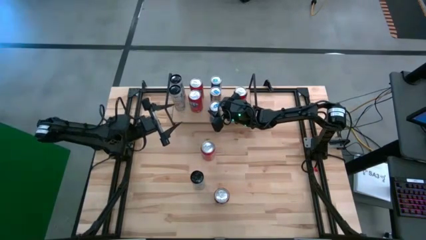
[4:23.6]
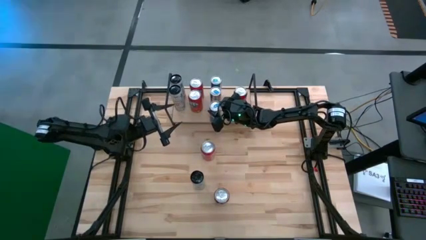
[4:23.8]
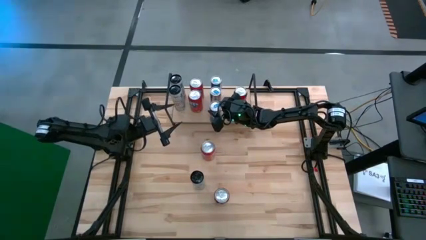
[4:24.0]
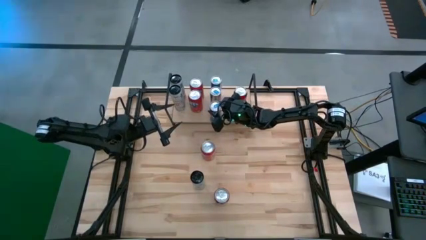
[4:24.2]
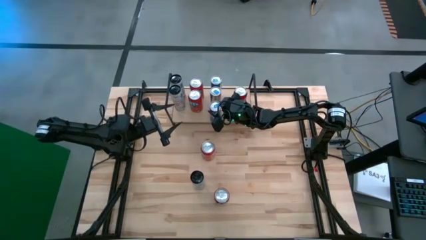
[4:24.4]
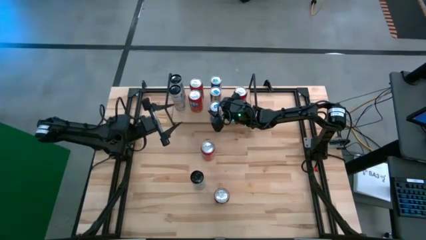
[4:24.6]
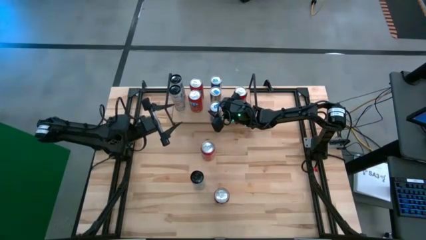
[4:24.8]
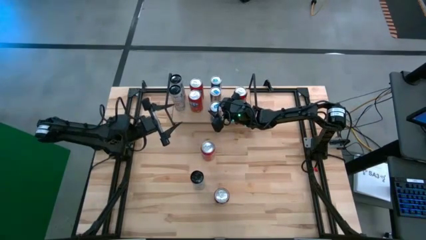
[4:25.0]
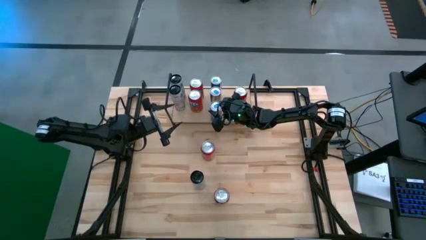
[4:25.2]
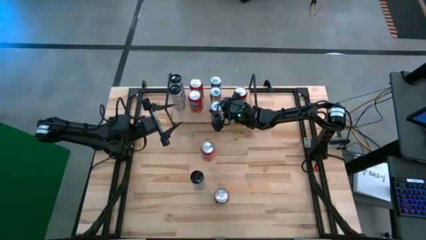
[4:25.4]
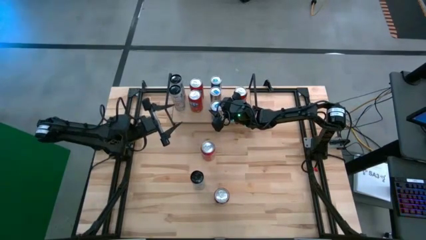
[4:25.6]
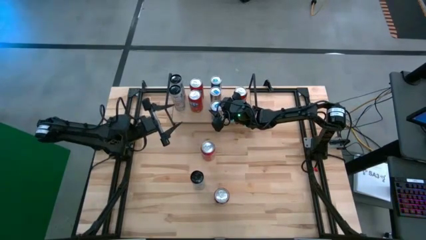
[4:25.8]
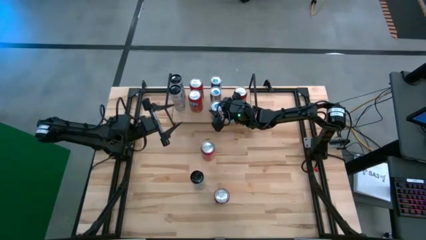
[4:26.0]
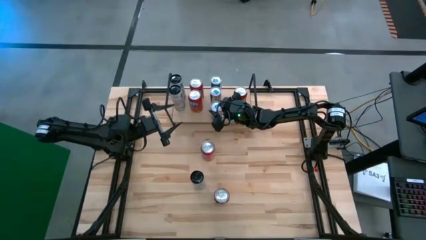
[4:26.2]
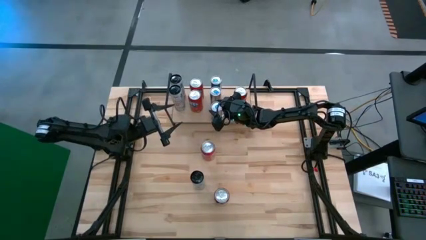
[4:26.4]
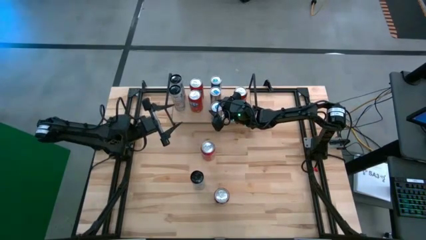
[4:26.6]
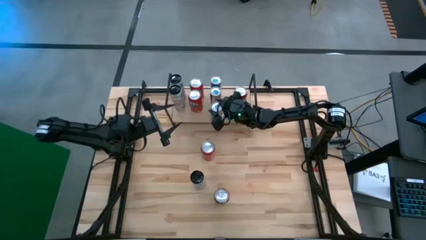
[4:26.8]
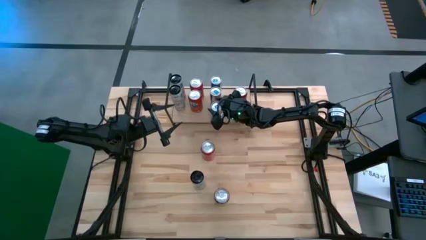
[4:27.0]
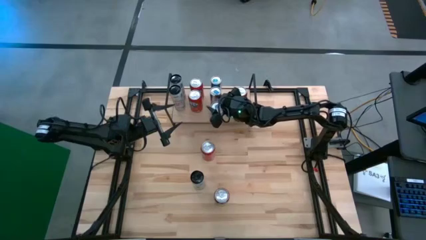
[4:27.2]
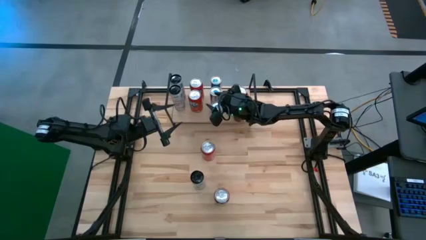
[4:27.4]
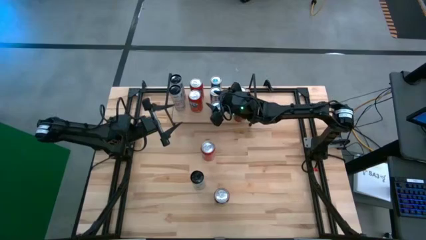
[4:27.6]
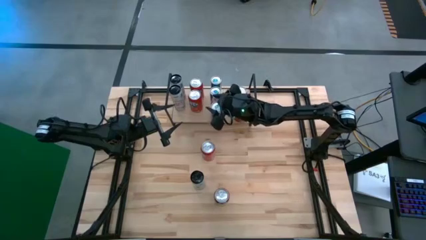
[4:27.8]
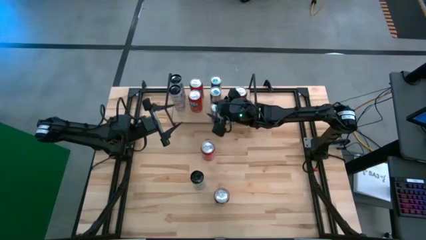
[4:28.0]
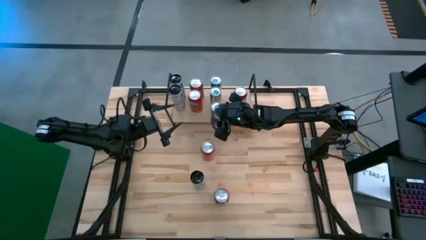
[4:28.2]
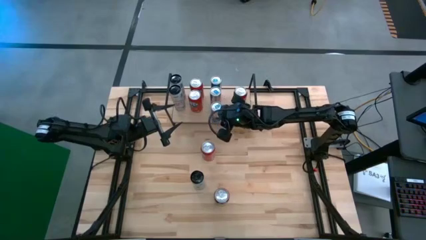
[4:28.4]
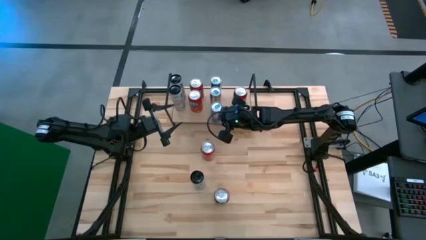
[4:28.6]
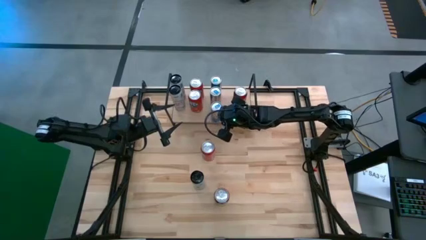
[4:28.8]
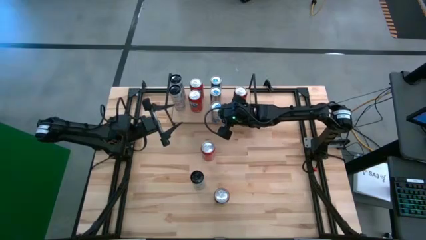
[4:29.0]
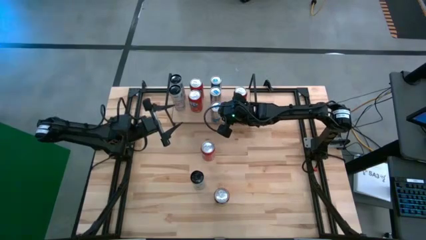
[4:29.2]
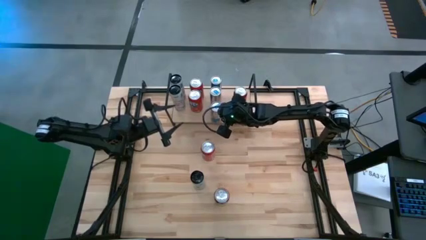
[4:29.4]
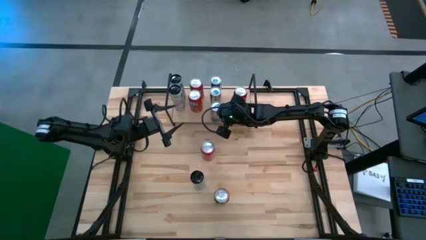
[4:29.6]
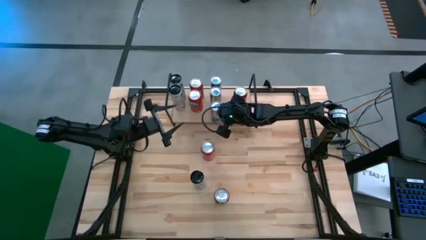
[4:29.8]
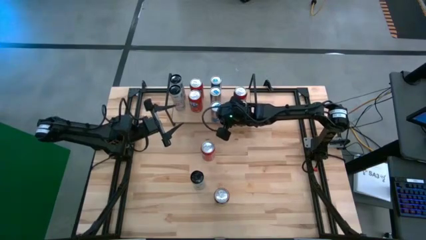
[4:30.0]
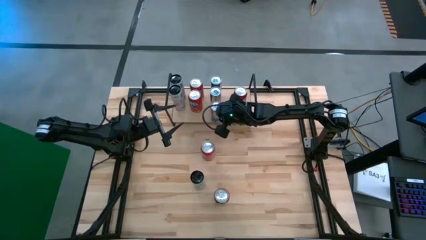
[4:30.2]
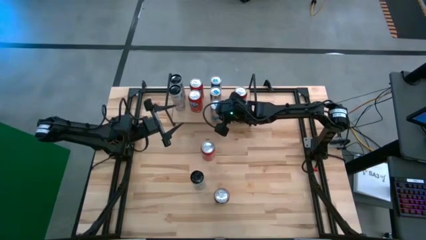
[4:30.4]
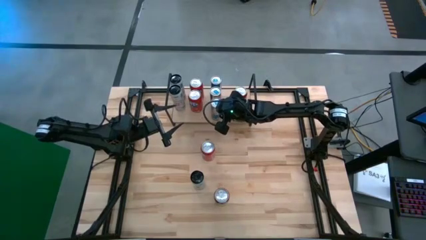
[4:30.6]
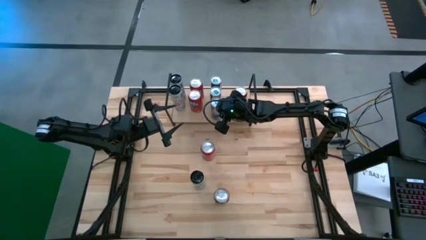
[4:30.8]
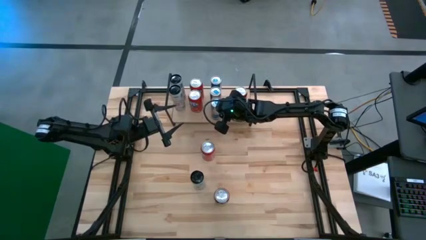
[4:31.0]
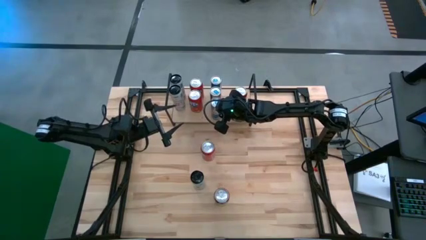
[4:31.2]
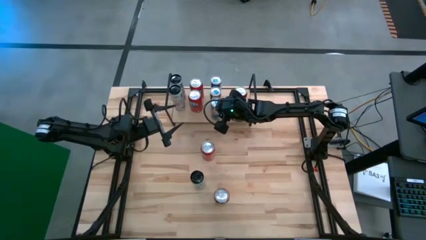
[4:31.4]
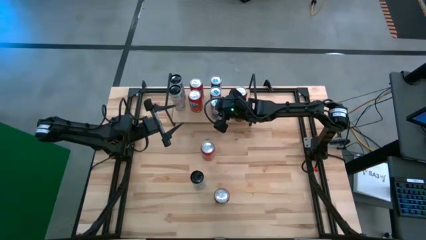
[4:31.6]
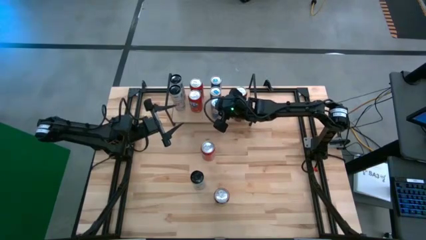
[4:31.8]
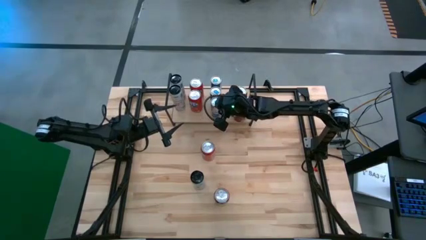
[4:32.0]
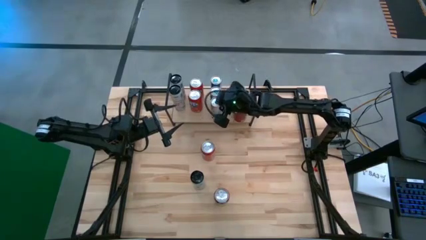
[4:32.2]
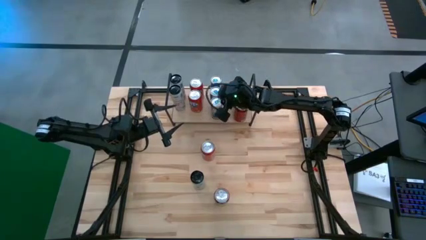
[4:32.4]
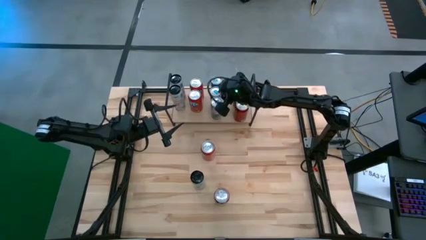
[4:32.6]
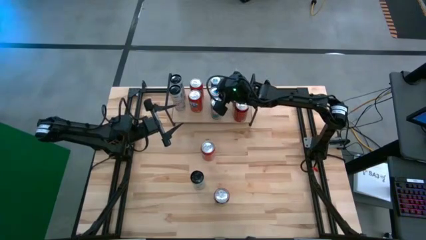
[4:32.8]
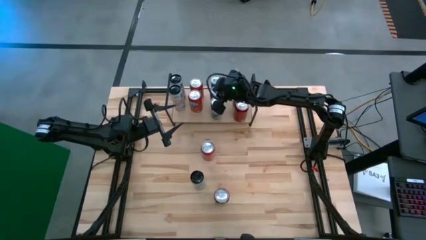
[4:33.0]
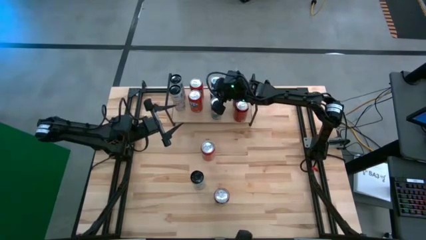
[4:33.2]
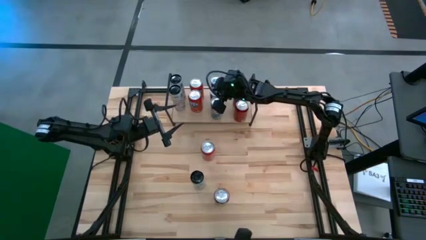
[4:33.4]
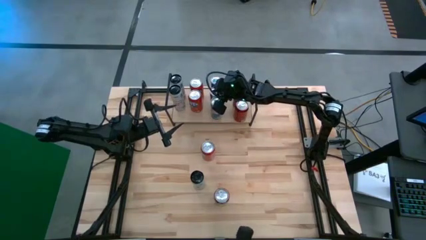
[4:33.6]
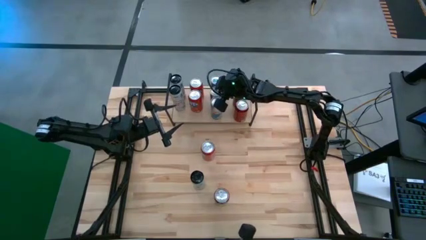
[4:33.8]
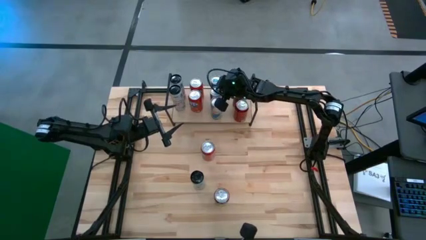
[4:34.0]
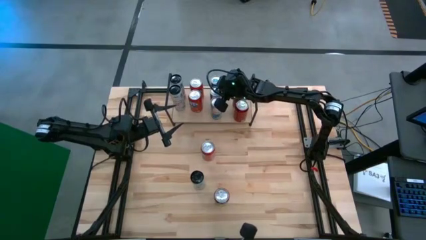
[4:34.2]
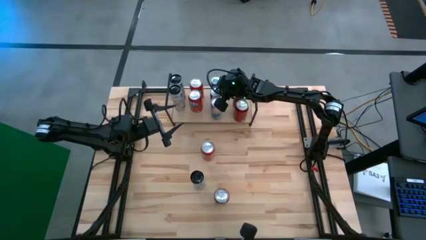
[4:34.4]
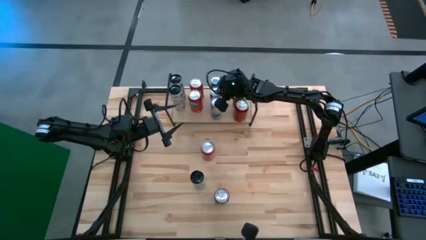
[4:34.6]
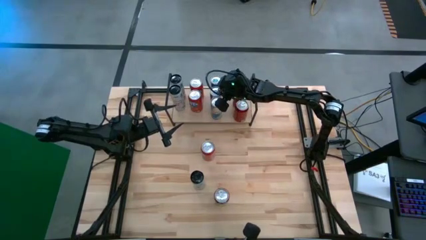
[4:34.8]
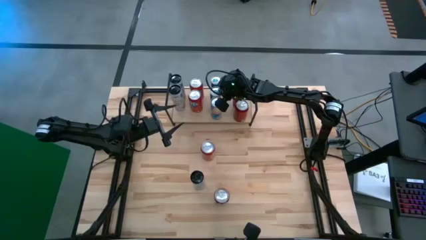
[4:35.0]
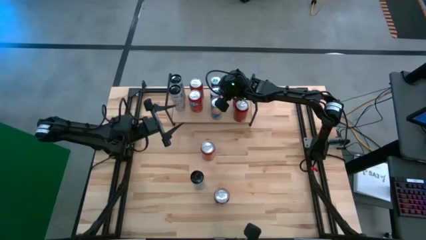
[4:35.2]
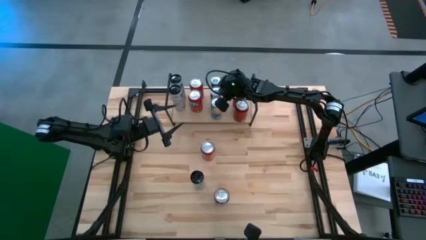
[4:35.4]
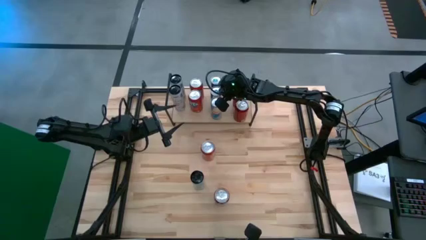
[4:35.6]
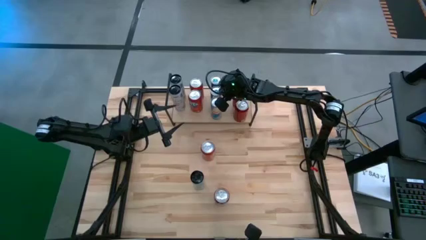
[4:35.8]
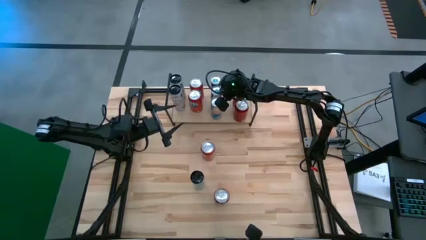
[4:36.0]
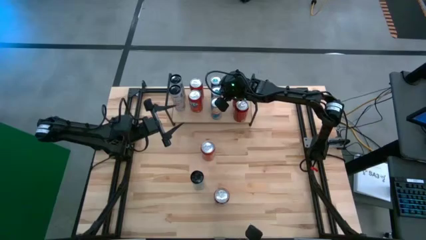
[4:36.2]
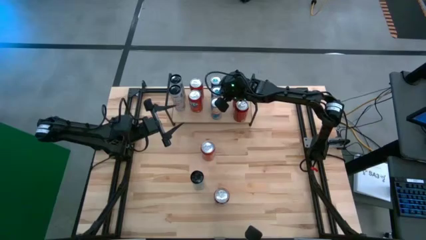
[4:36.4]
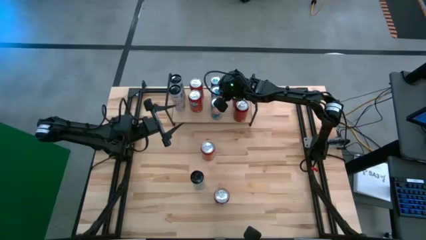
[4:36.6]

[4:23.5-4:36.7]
Task: Place canned beverage on shelf
Put the blue soda can on the shelf aligned with the other blue soda cans
